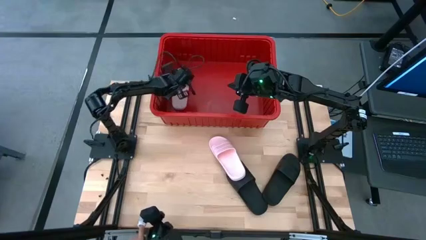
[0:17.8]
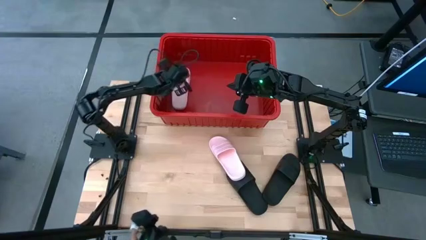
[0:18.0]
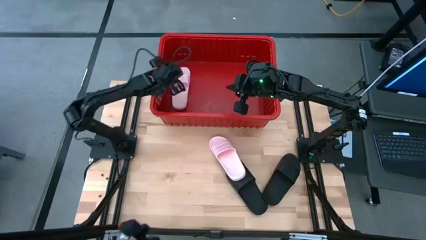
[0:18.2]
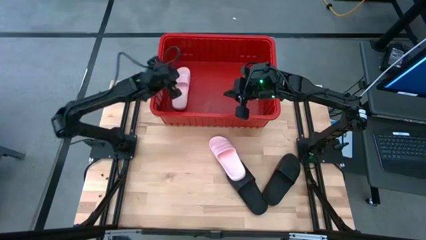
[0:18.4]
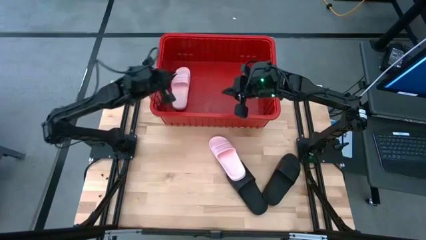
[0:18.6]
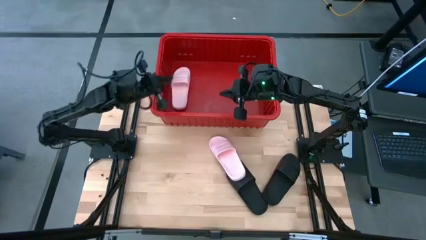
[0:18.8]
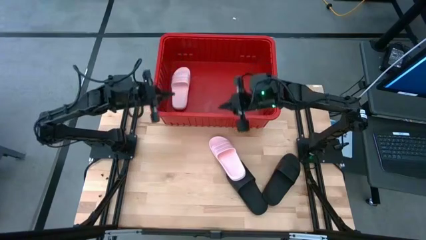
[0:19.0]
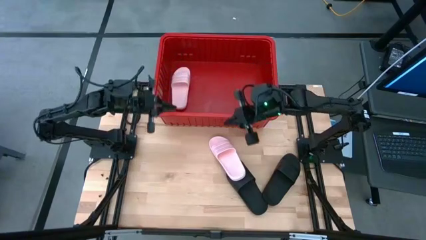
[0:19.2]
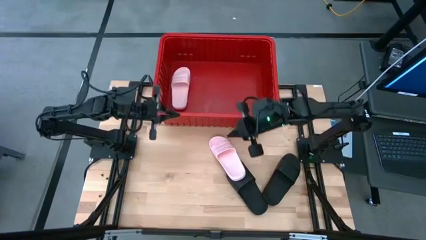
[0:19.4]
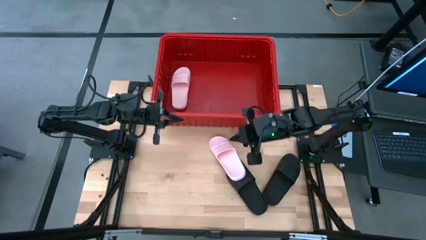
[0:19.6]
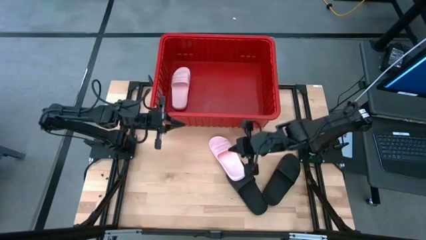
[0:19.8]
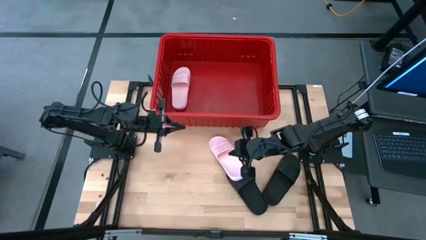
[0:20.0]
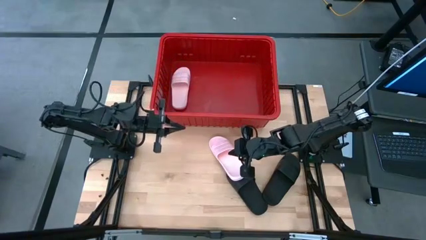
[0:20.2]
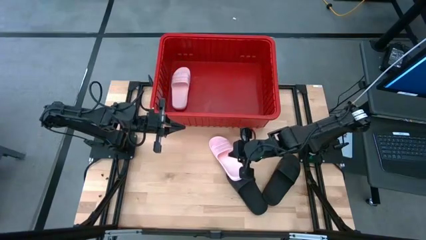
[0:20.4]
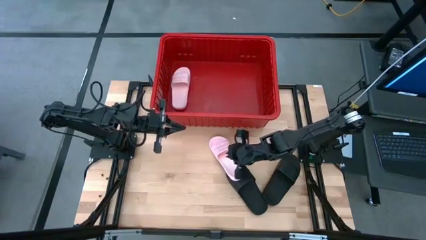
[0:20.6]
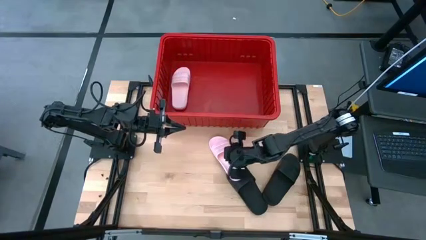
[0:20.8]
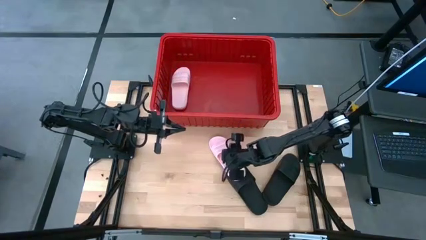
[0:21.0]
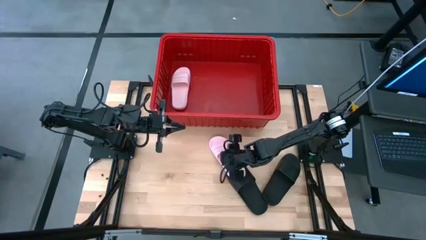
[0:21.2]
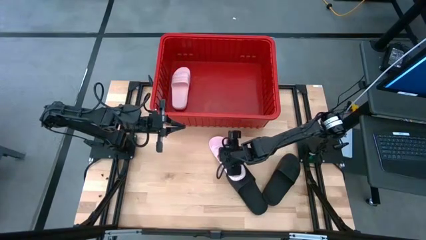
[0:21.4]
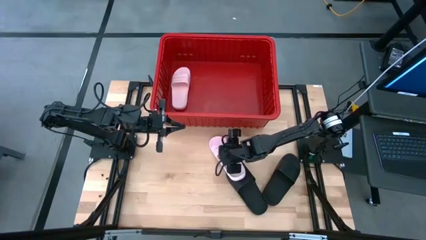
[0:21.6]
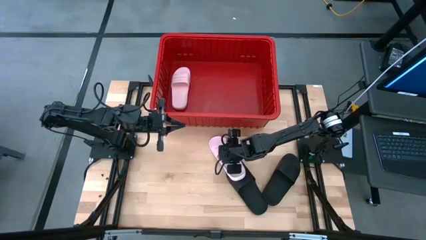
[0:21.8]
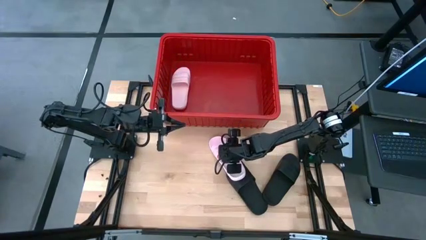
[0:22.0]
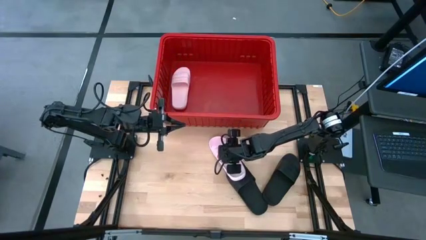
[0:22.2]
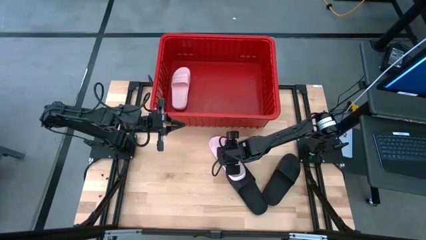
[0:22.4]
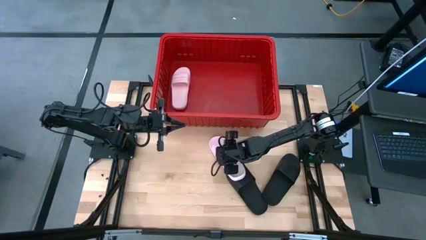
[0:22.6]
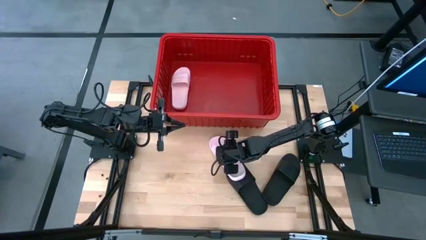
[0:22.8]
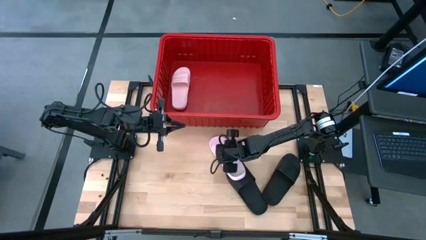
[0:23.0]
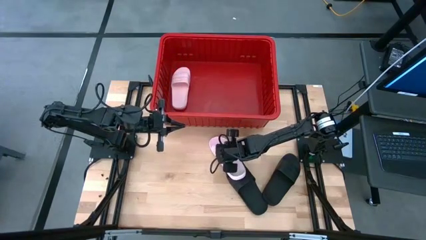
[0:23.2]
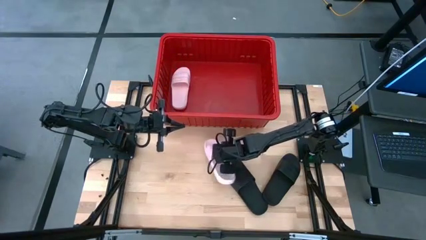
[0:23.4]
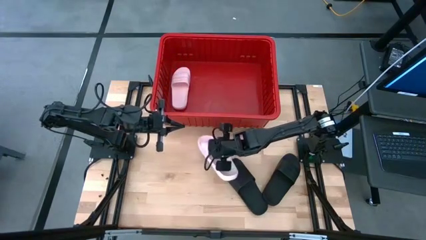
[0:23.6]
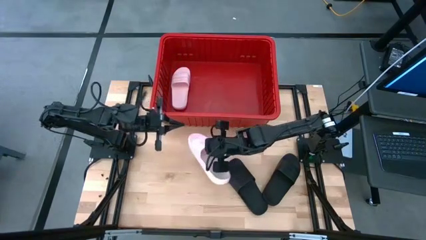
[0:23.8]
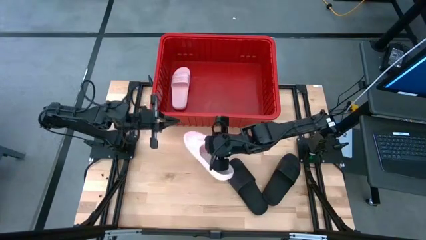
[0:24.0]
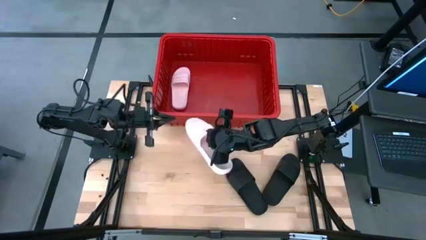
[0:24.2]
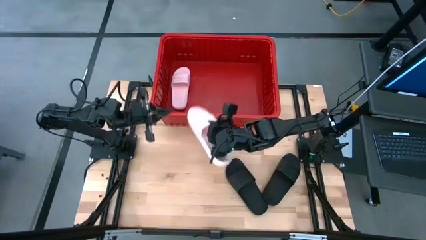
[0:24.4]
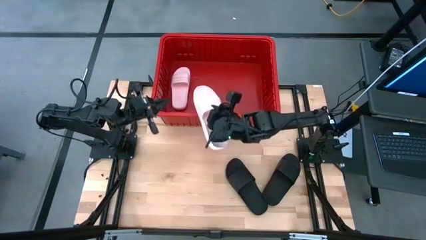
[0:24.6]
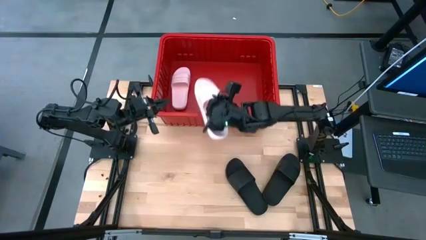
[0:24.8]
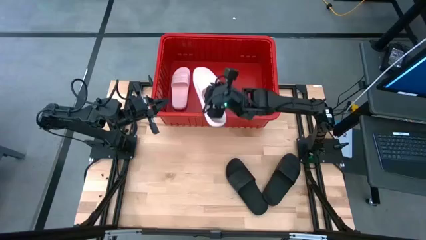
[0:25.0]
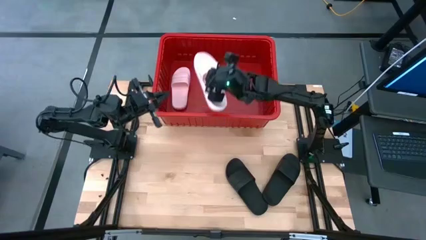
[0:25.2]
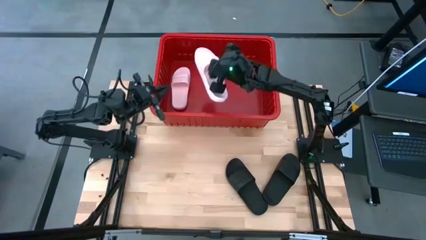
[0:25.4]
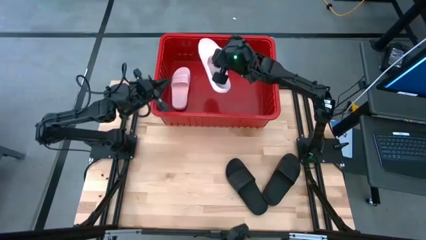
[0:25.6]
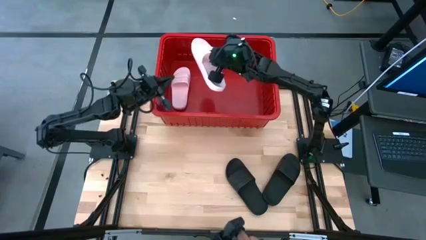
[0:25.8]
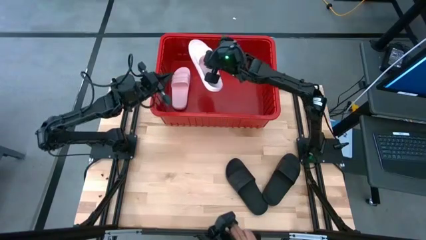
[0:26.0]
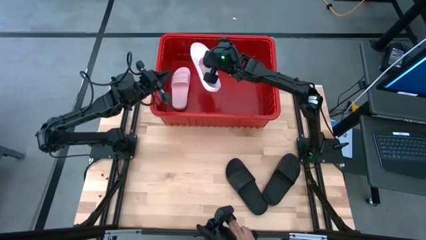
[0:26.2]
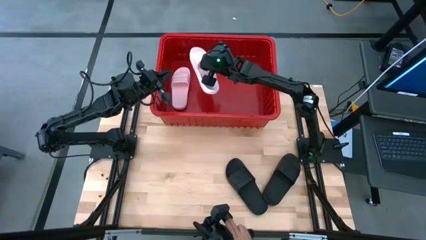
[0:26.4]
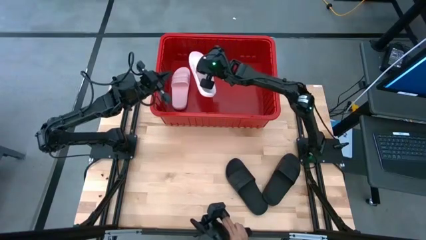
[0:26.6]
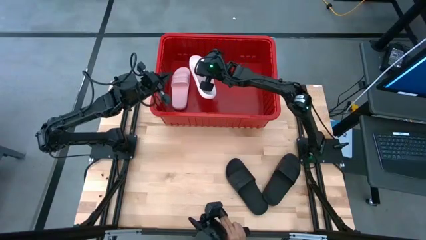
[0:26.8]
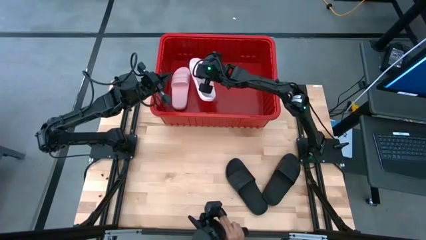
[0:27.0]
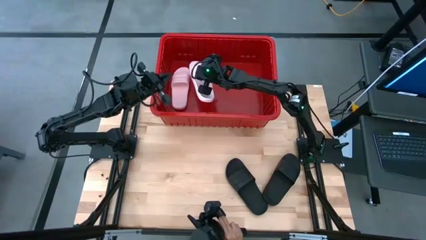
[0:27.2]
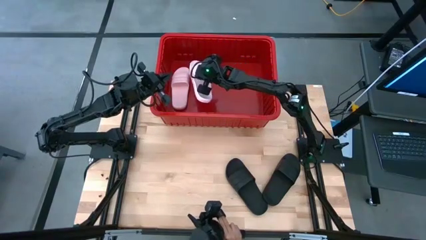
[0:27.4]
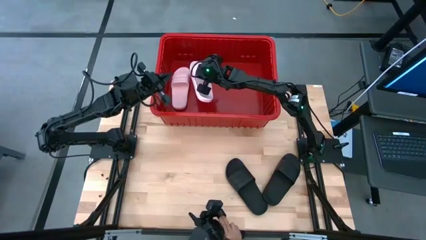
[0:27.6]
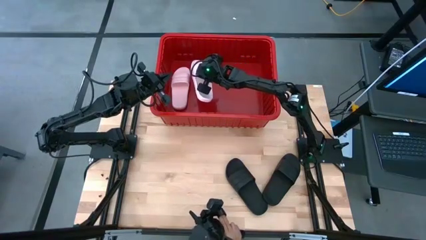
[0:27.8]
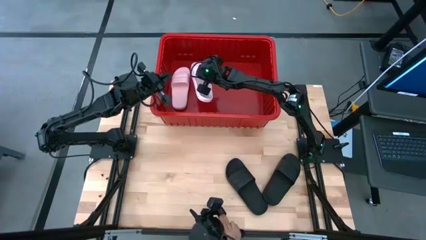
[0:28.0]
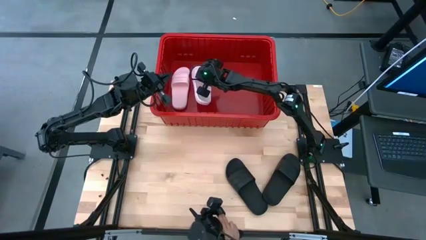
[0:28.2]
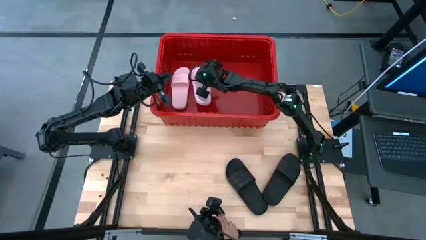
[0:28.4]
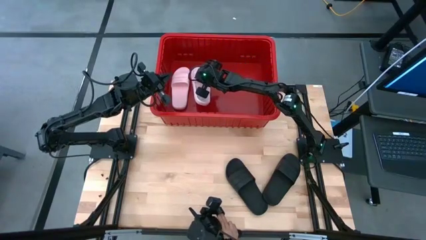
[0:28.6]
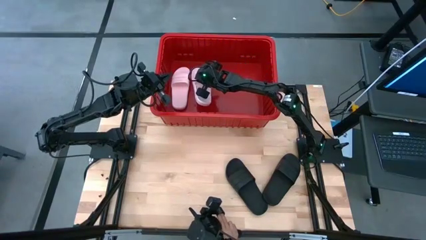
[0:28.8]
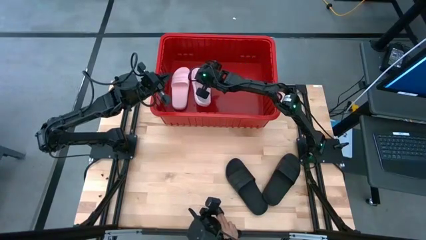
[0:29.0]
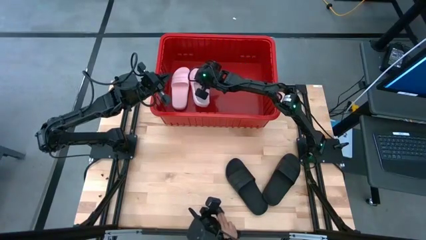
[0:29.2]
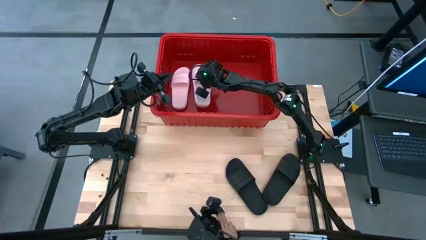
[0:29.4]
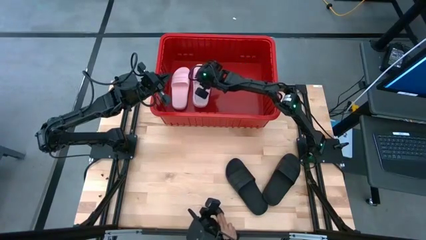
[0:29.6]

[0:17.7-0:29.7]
Task: Pick and place slides into bin
Put the pink slide into the red bin
